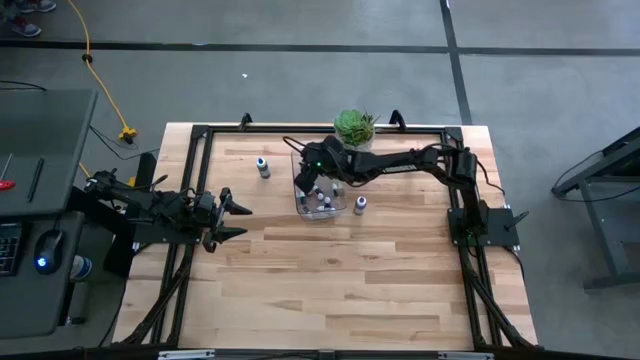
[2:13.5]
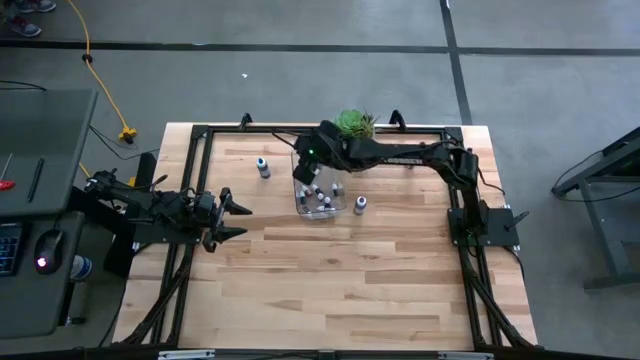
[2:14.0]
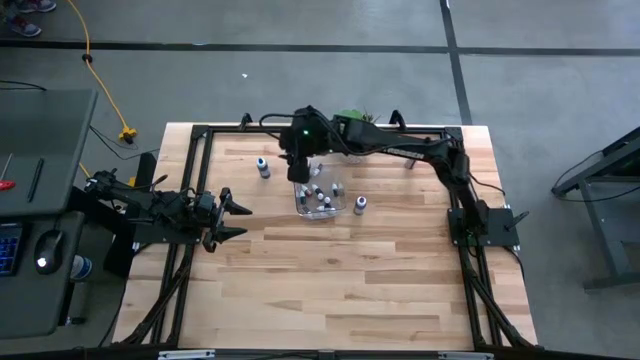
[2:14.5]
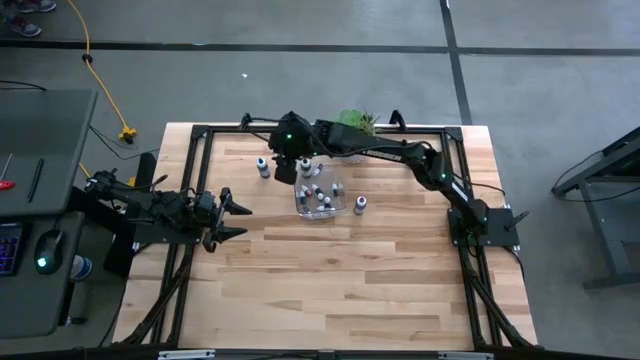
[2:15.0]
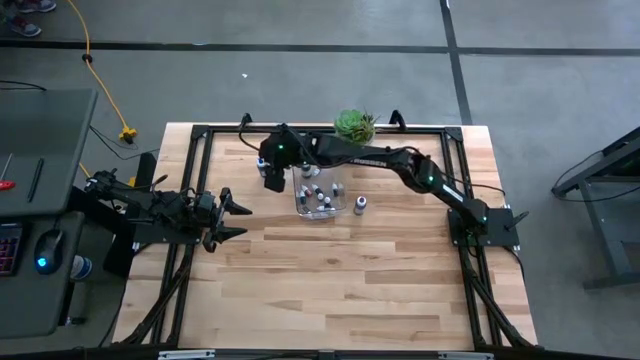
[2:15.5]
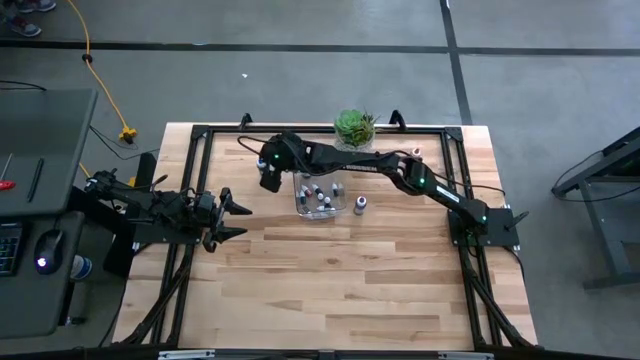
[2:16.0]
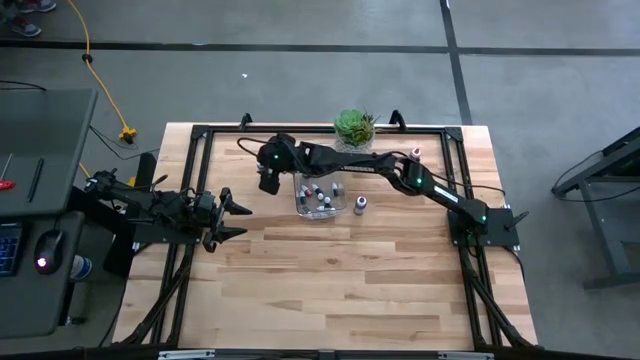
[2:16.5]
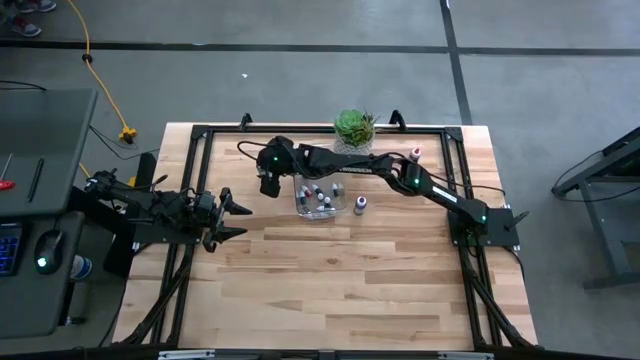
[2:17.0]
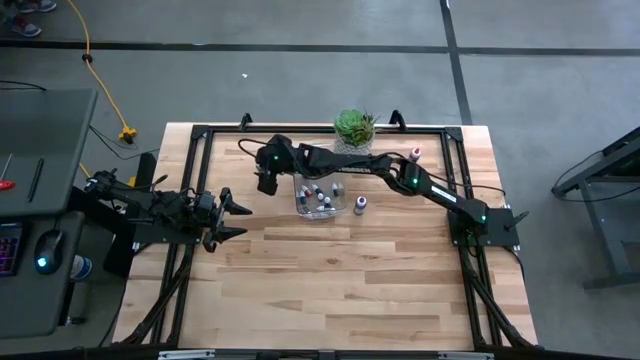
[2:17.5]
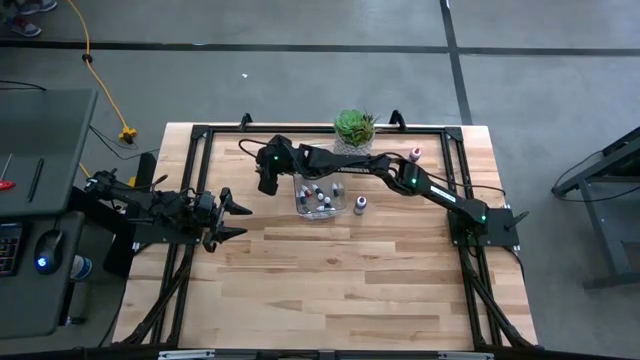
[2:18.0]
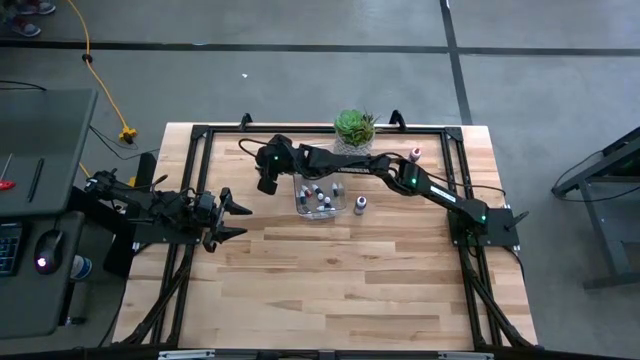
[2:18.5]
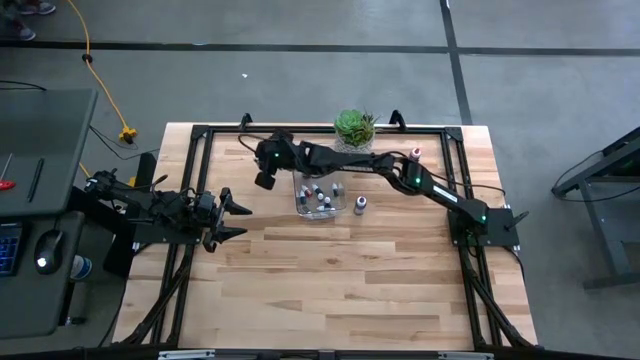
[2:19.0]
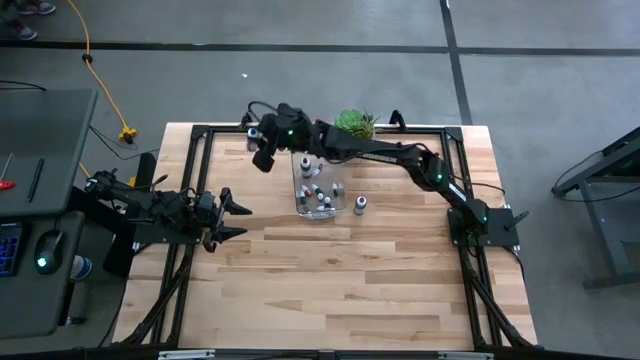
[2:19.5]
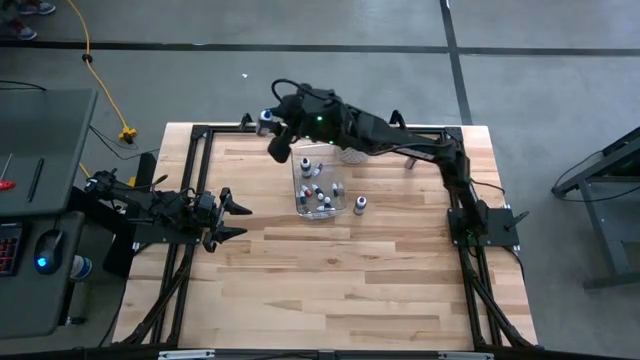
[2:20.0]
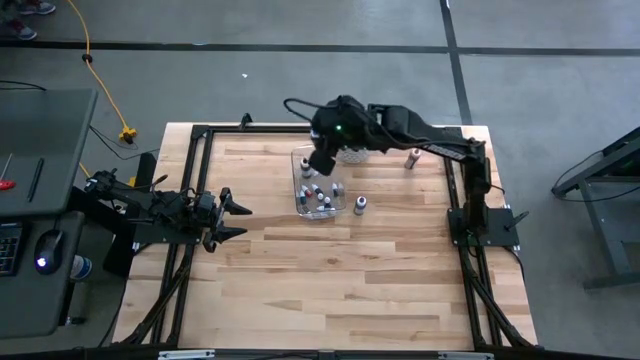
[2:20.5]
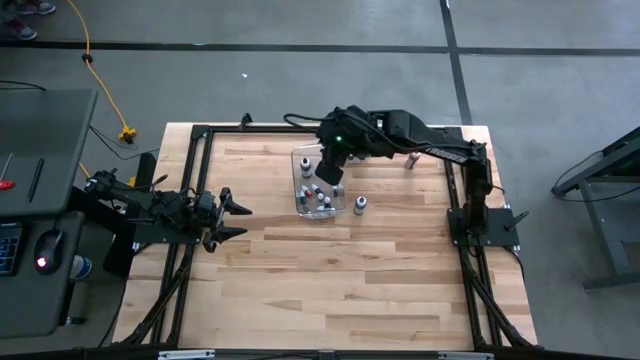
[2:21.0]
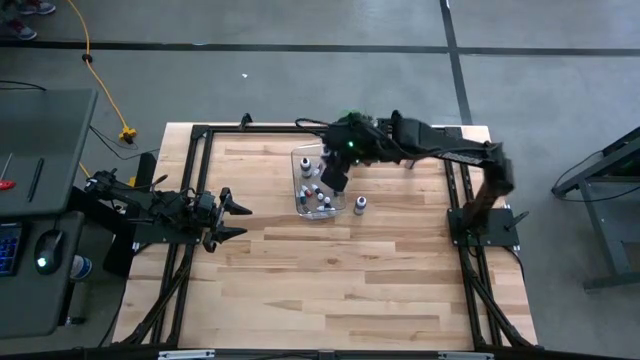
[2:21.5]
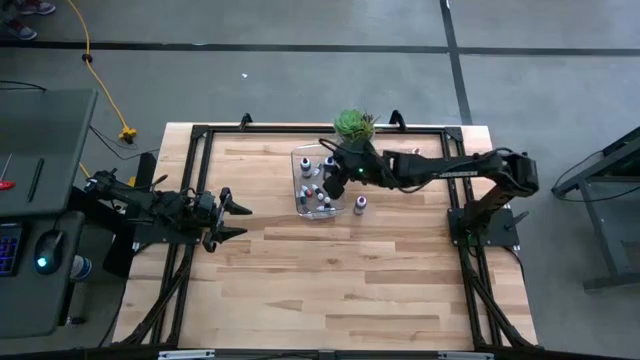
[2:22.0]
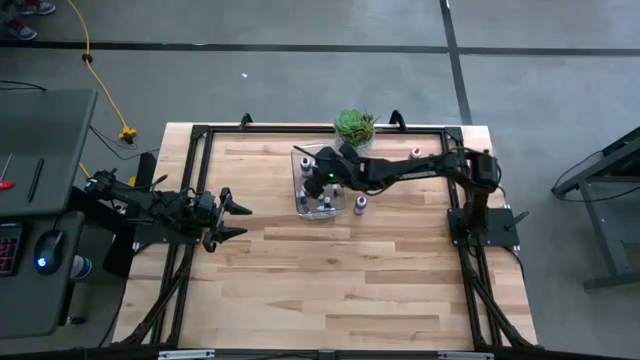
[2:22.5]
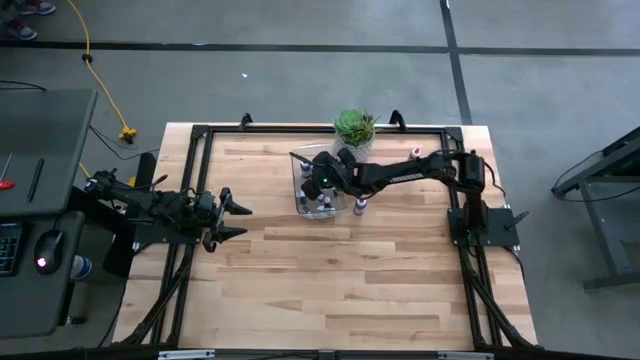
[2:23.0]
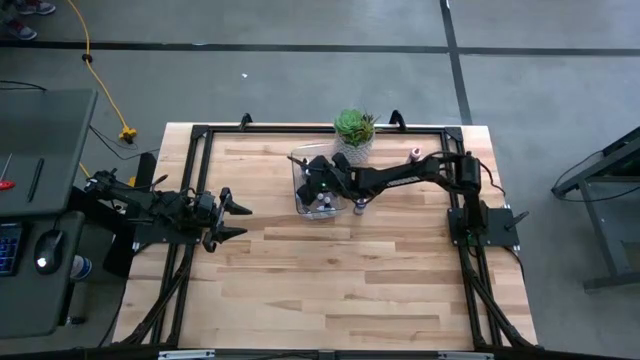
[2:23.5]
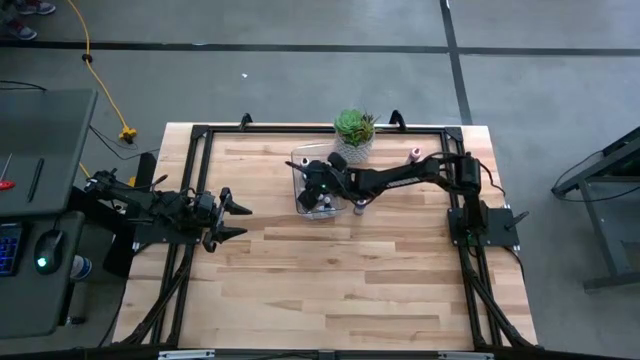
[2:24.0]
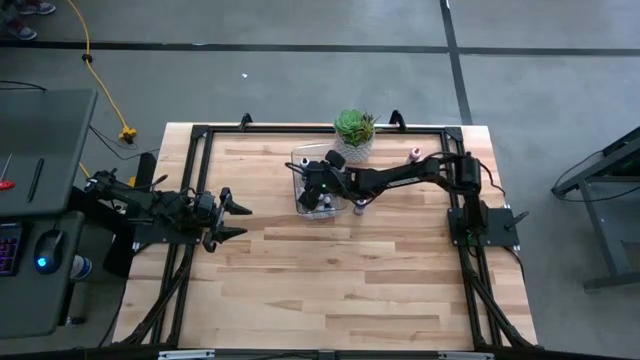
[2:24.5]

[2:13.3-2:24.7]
Task: Pick & Place food coloring
Put the big blue food coloring bottle into the transparent bin

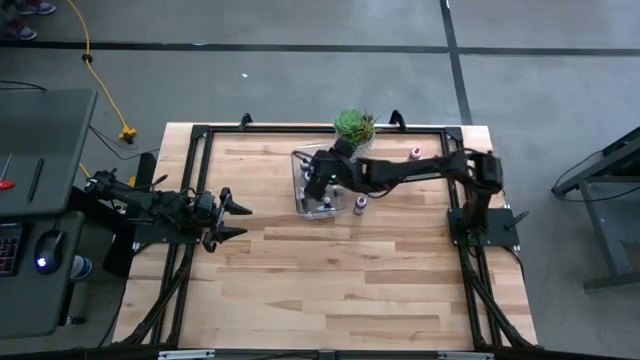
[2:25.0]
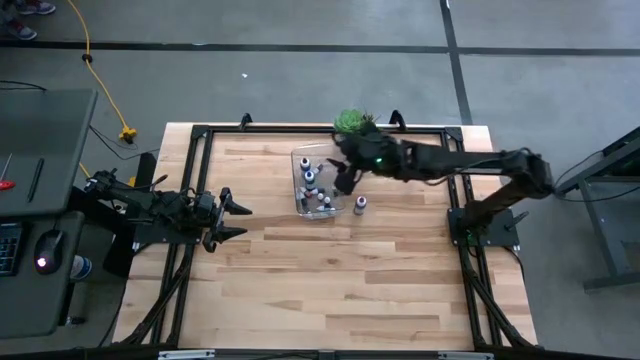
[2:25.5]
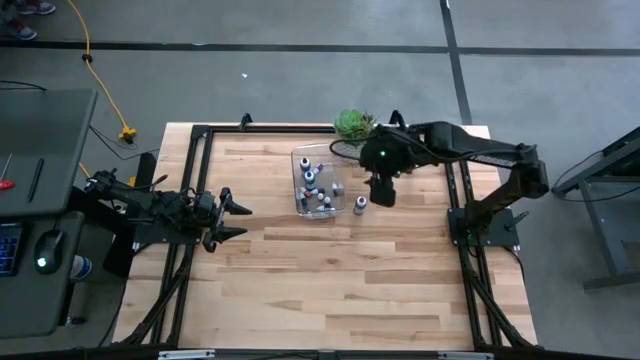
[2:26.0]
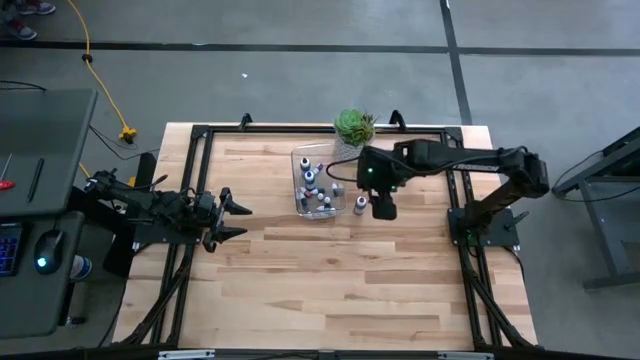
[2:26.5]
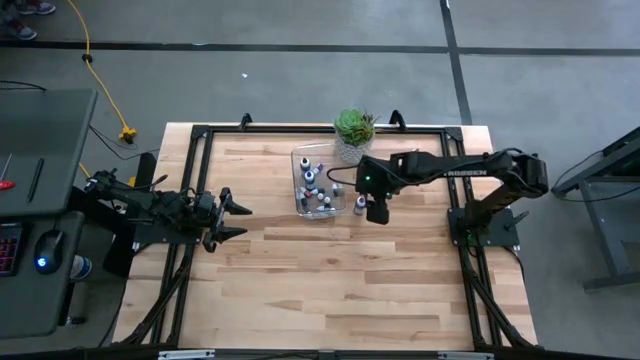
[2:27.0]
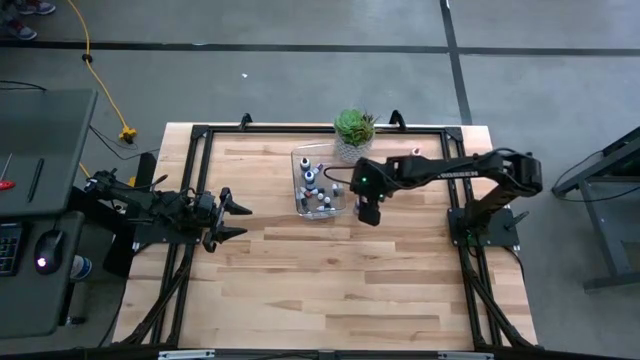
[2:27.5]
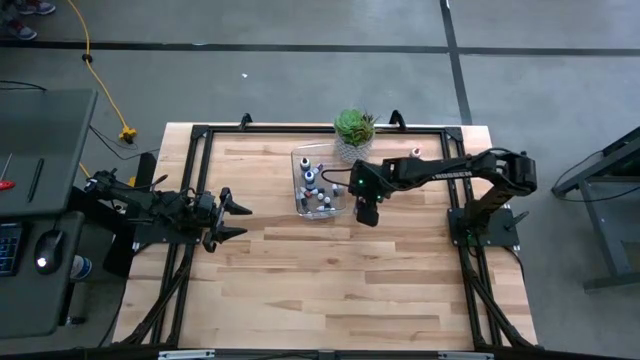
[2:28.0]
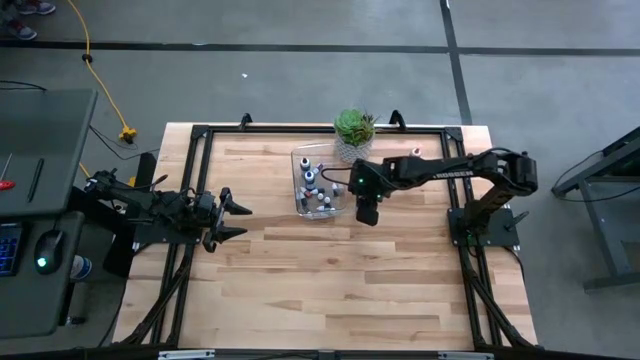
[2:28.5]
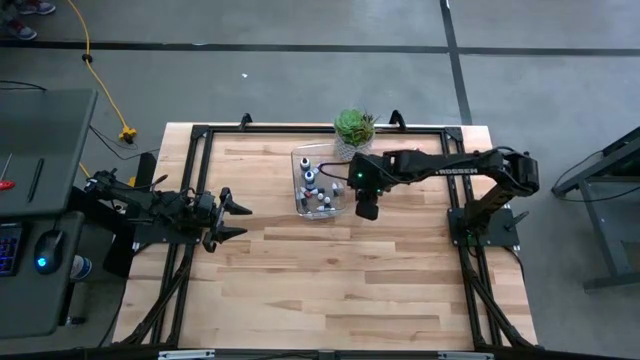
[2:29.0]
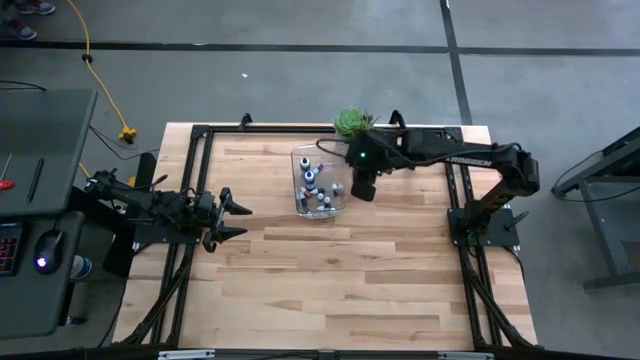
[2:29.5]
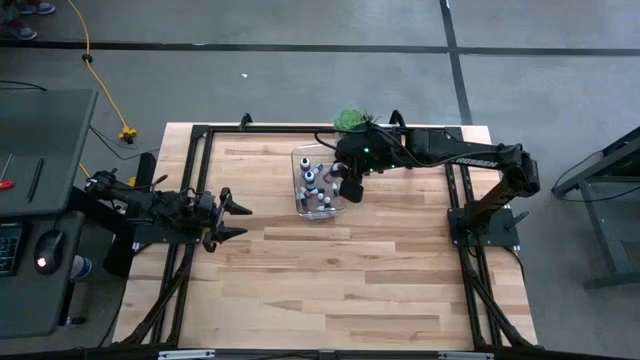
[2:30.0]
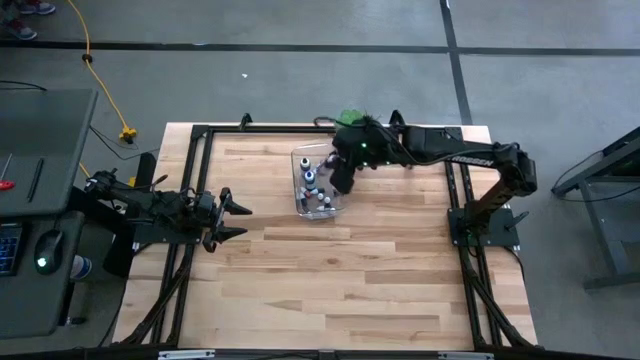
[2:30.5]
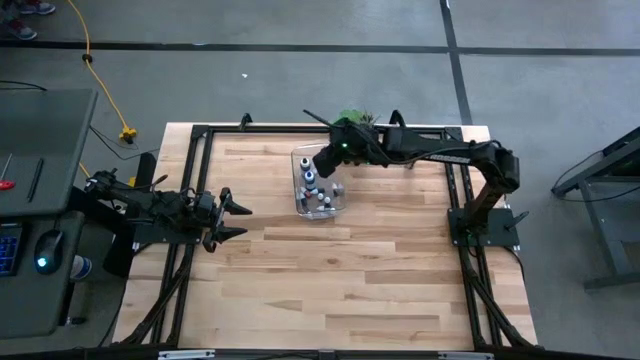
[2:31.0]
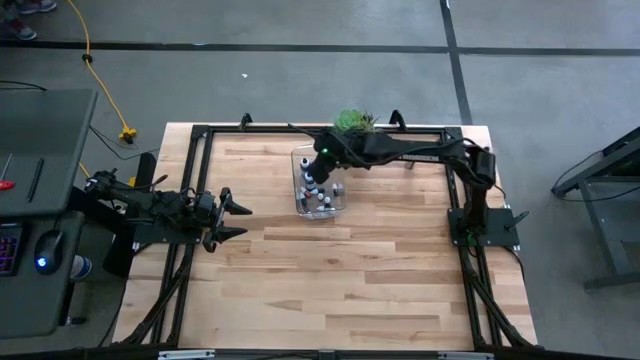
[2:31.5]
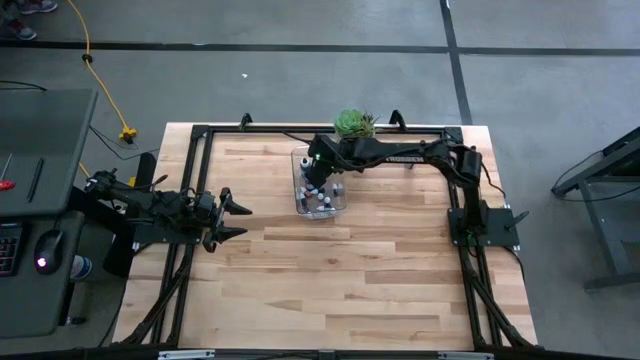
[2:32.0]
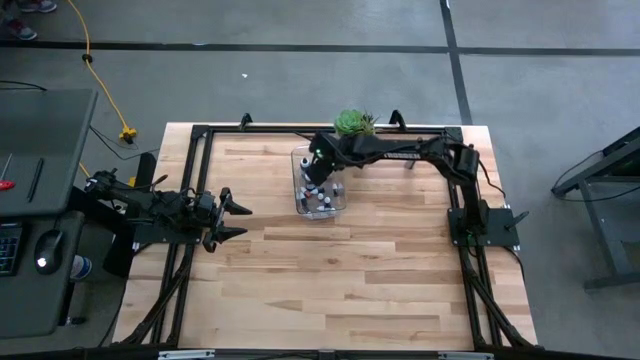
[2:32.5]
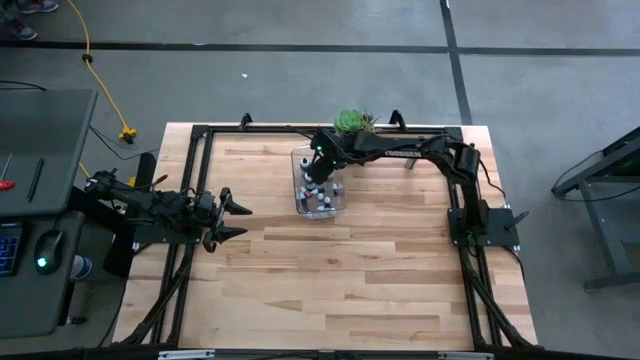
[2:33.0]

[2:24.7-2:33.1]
Put the big violet food coloring bottle into the transparent bin
